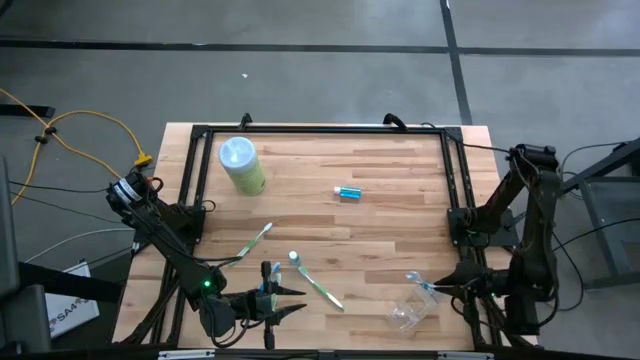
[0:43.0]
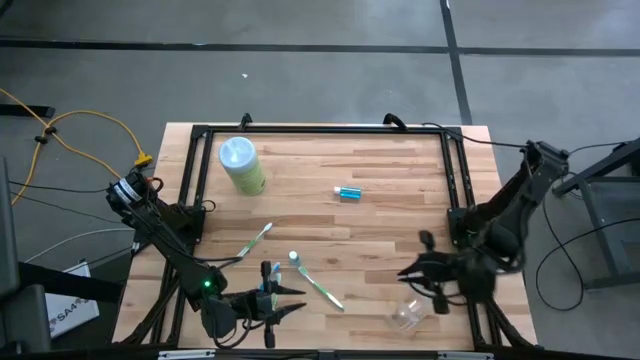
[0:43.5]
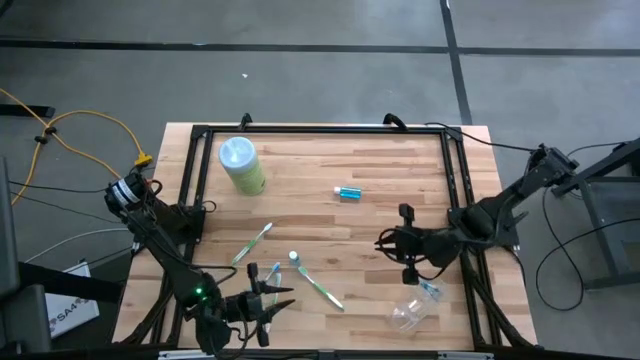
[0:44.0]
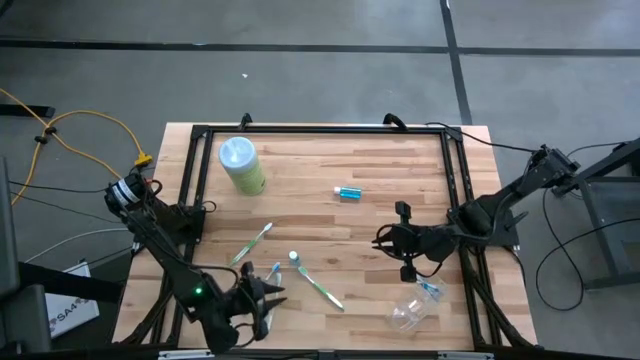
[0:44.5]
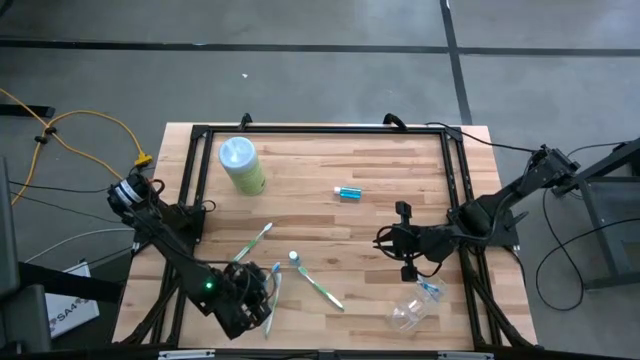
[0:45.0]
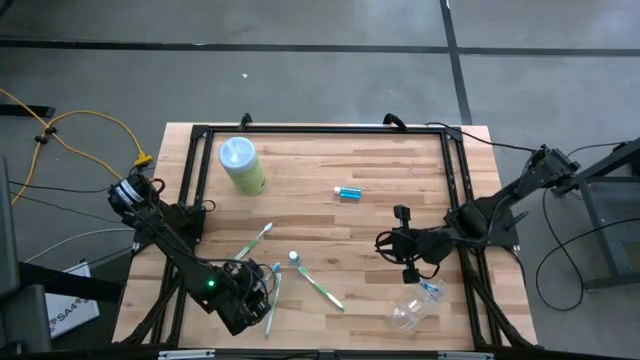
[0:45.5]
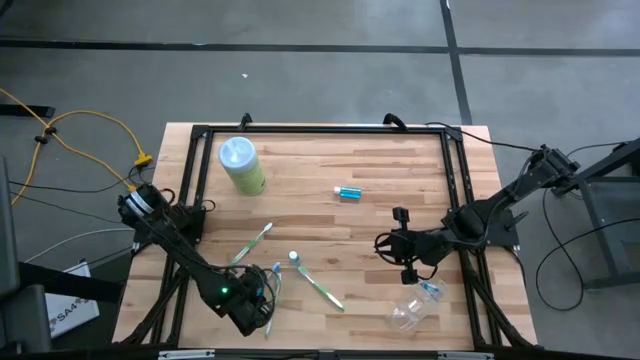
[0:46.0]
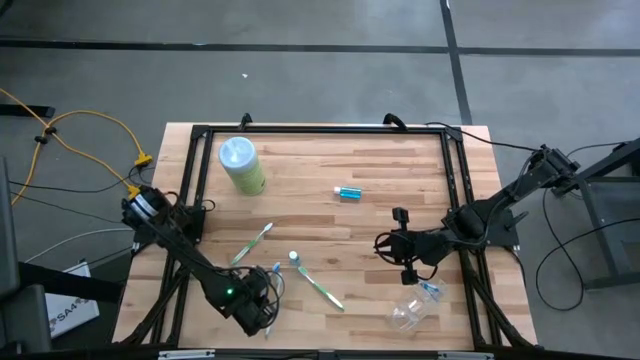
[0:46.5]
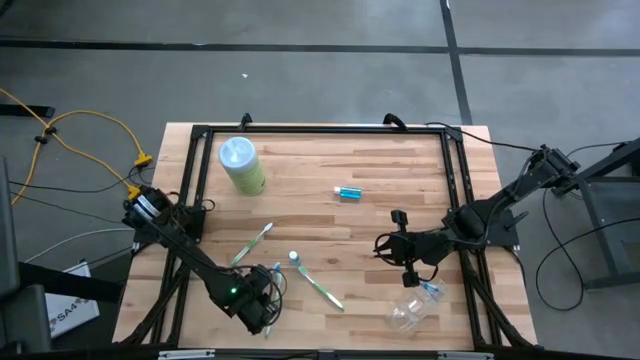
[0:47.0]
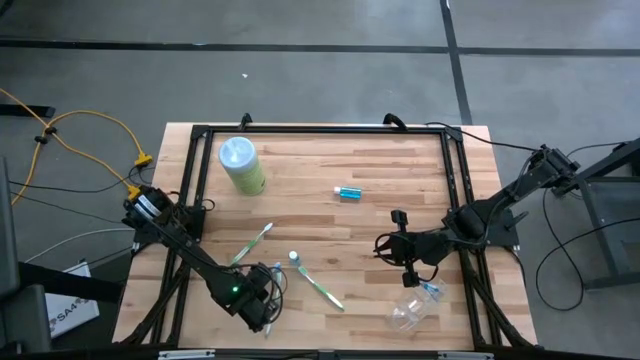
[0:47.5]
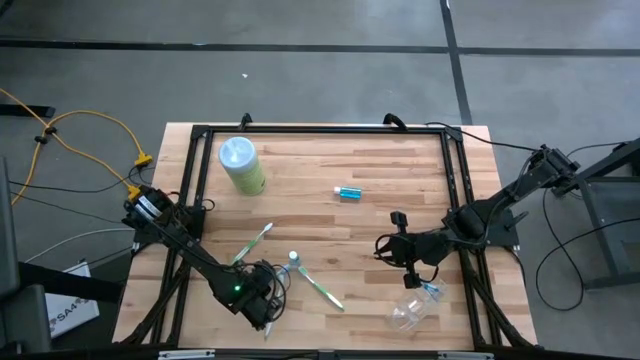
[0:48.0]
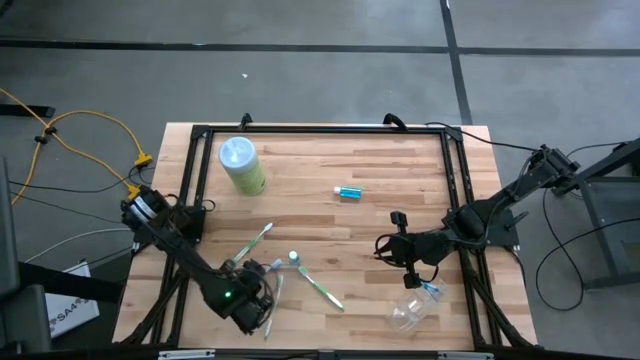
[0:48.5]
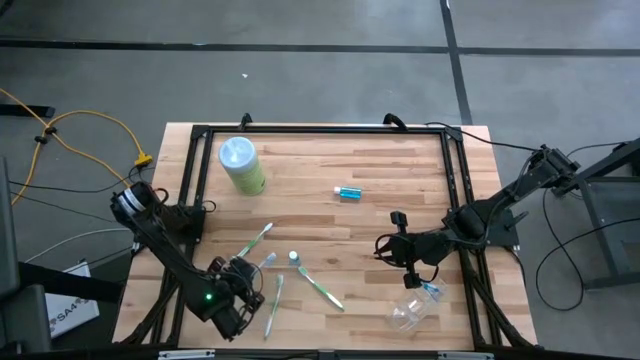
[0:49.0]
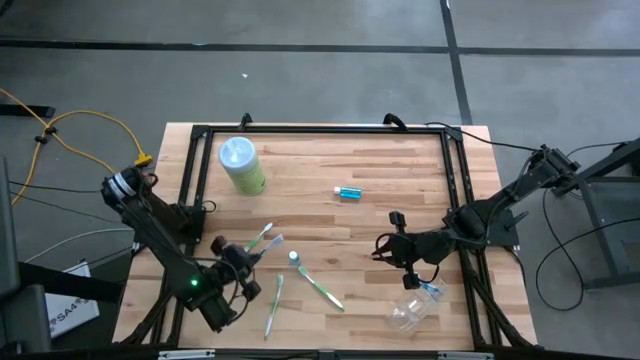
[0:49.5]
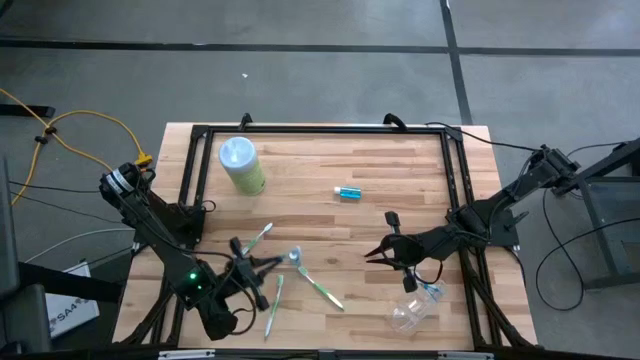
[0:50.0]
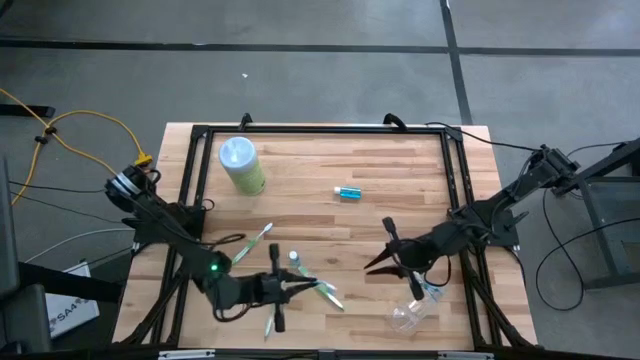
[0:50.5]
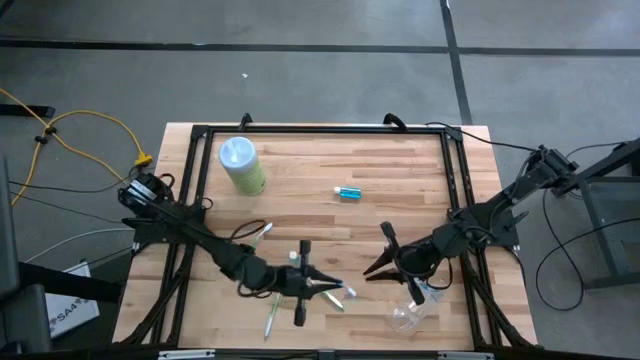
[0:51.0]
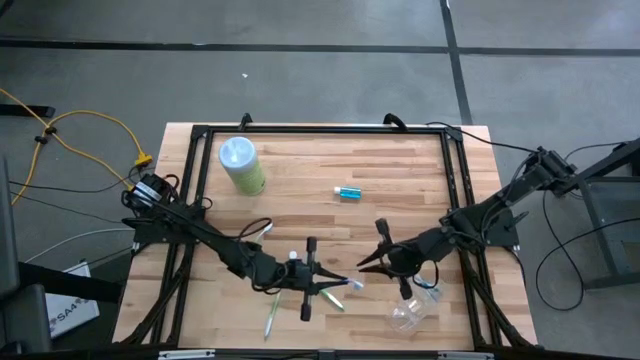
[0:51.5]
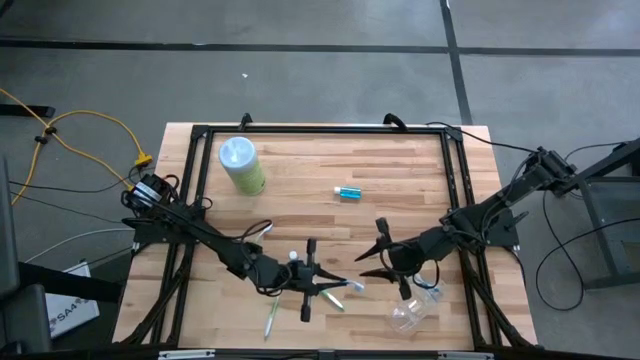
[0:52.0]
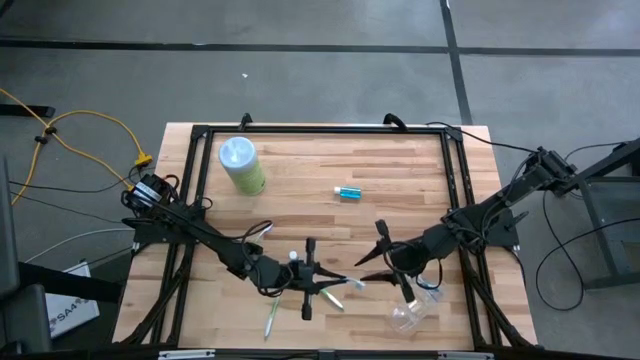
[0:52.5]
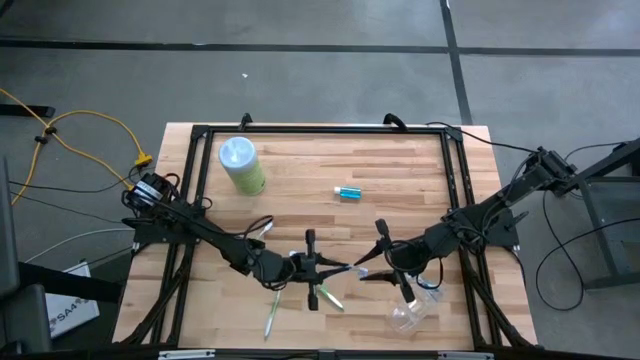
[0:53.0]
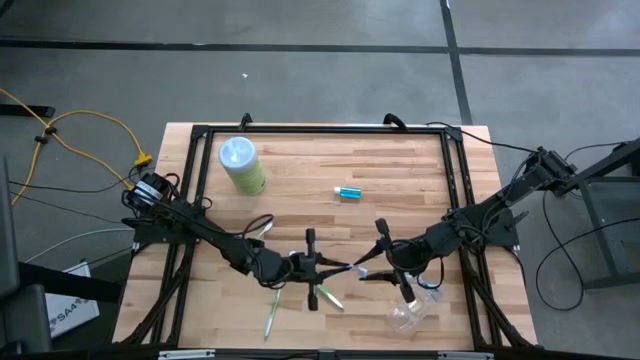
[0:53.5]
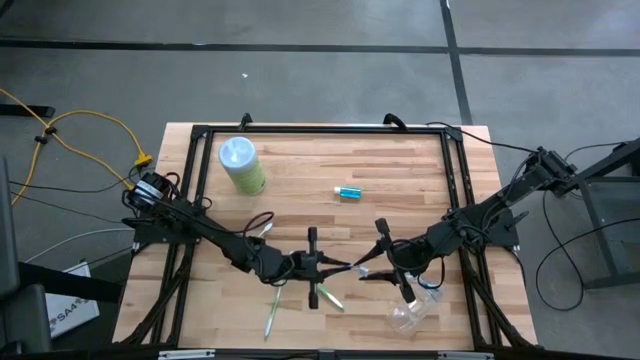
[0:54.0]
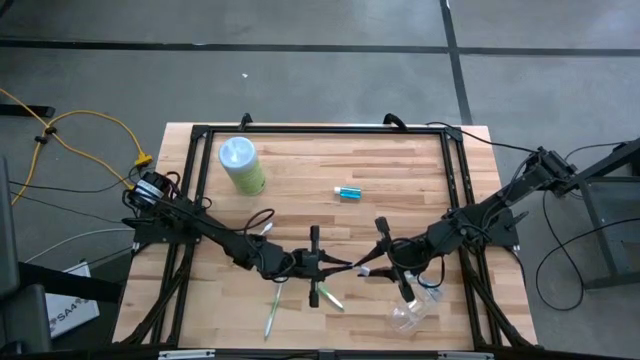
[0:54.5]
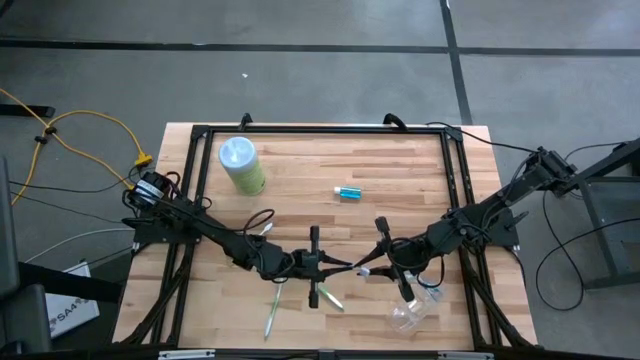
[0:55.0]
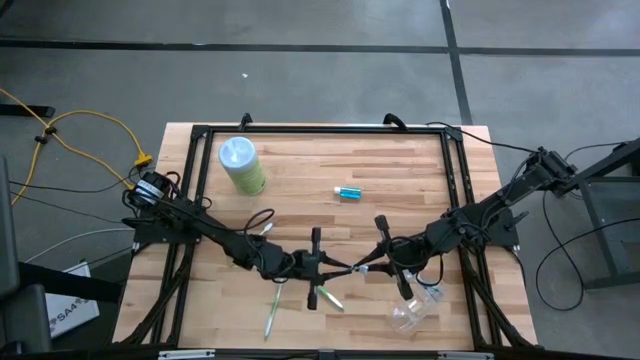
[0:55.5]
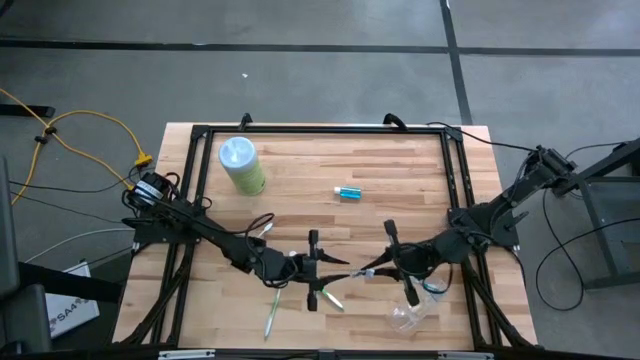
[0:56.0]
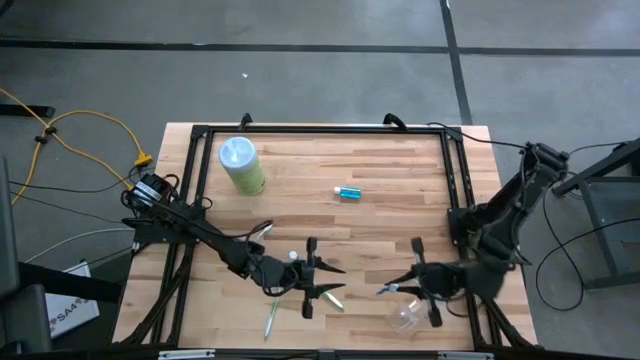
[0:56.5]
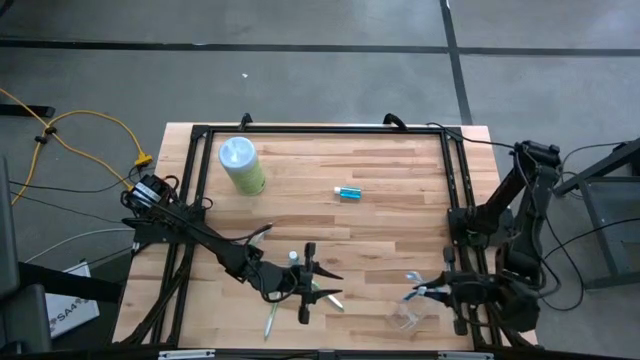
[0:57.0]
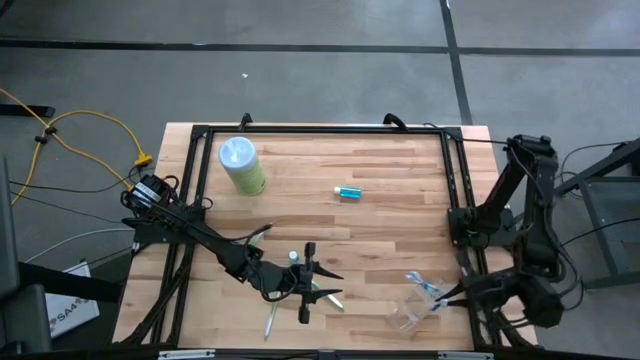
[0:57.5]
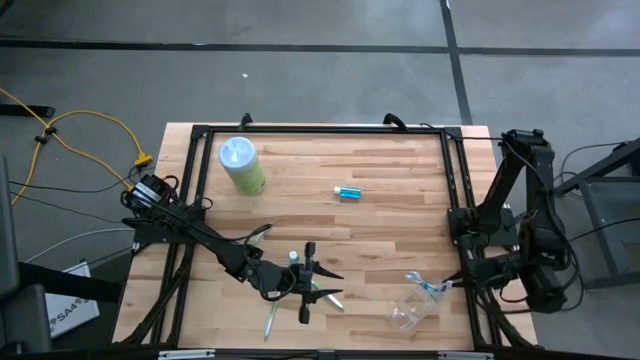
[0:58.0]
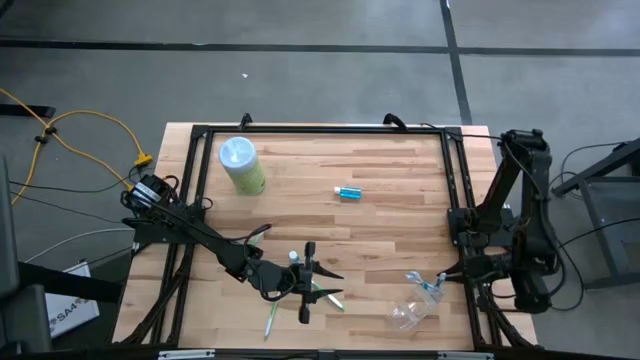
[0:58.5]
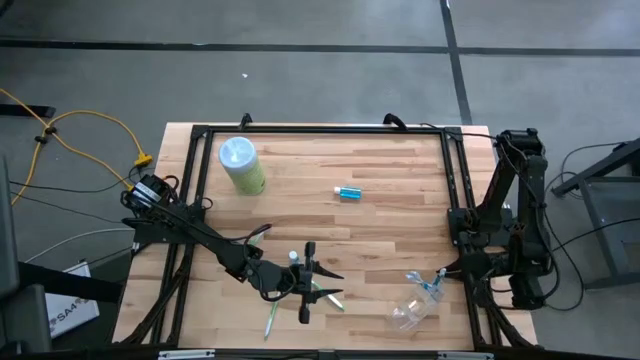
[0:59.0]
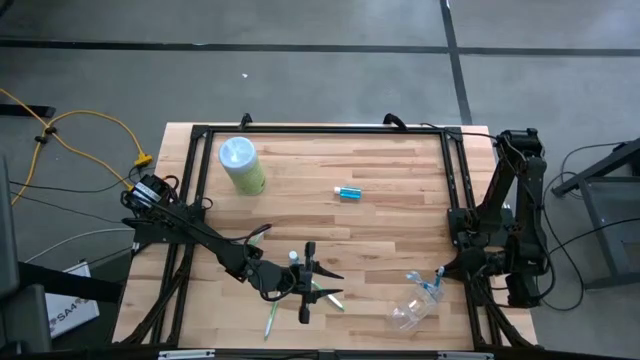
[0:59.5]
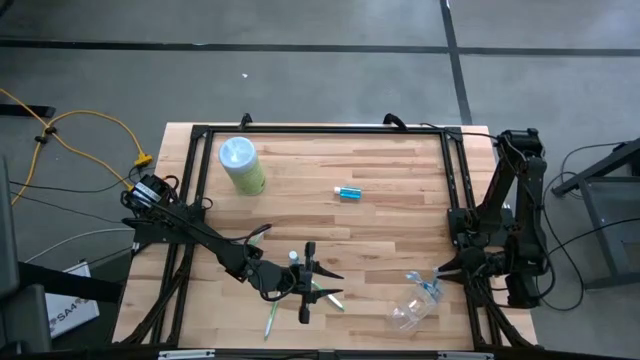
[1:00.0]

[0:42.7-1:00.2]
Task: Pick & Place toothbrushing station
Put the blue toothbrush into the right section of the transparent organizer

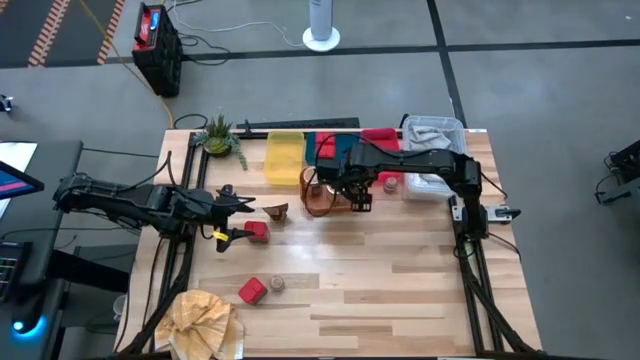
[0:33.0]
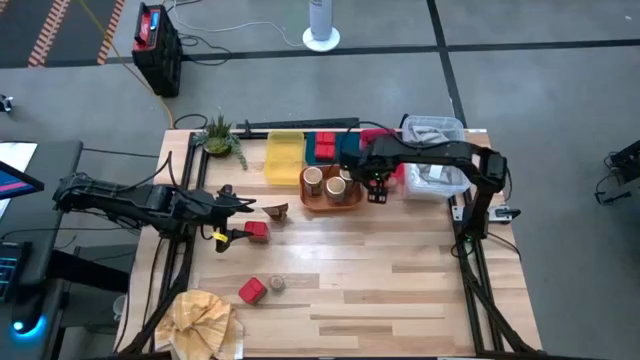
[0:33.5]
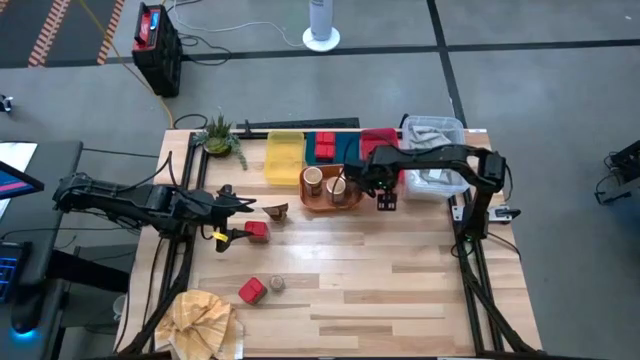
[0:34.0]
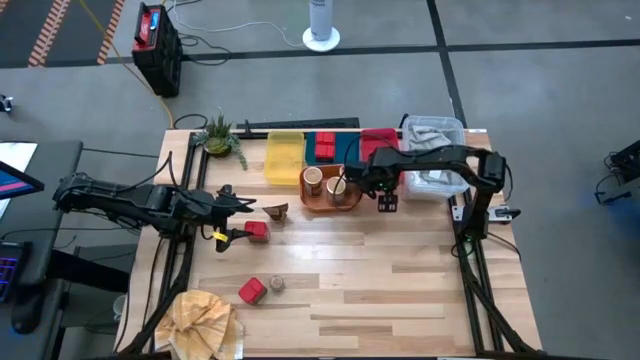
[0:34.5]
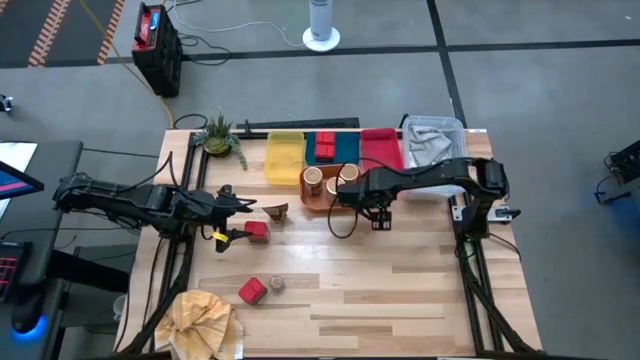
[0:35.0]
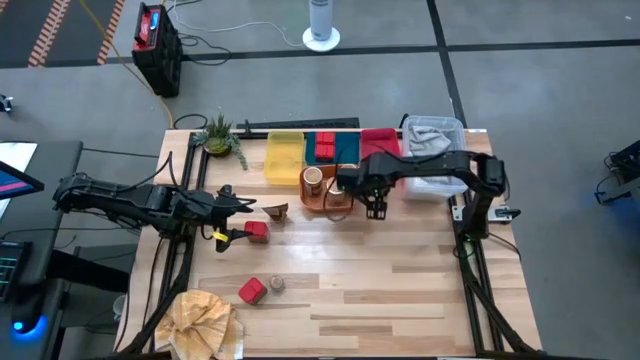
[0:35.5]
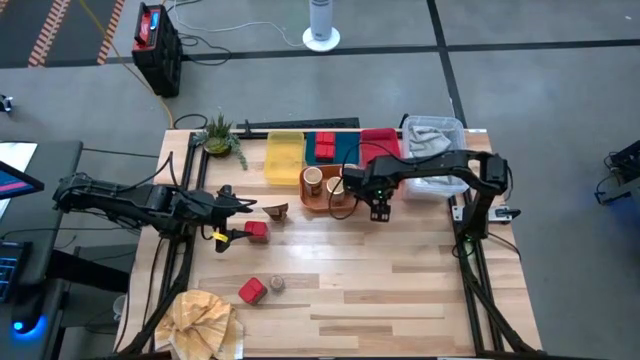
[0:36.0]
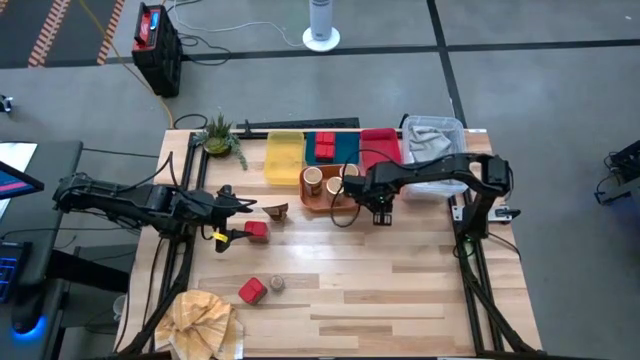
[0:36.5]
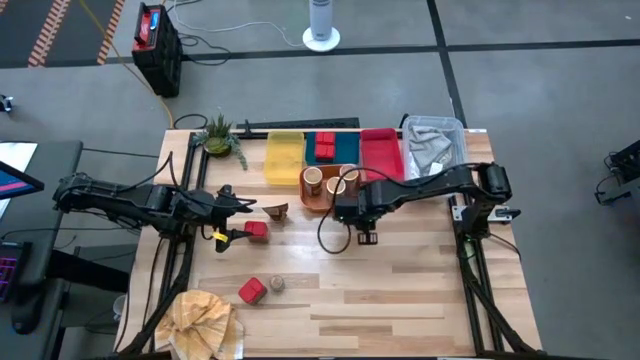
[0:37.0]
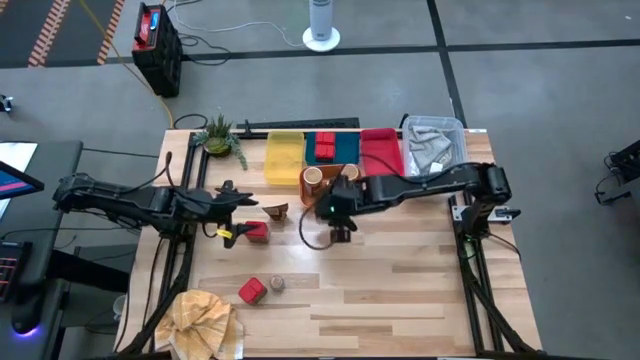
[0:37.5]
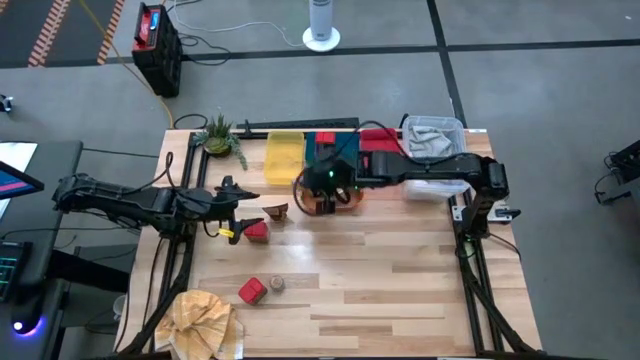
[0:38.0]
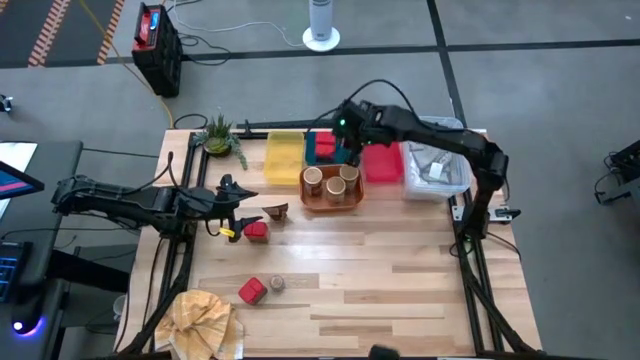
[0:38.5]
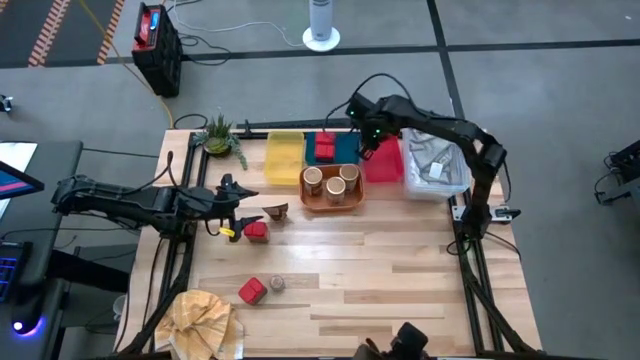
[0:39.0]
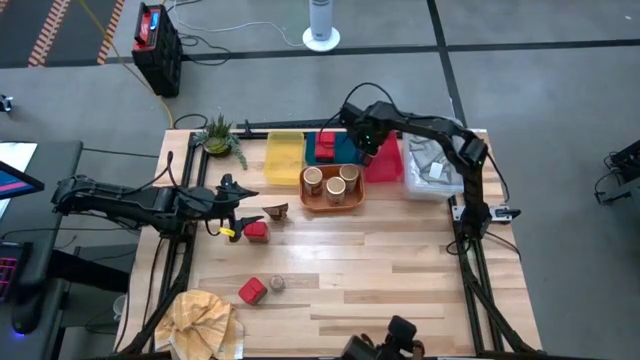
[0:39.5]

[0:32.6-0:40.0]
Task: Sort spices by type
Put the brown seasoning bottle into the red bin
